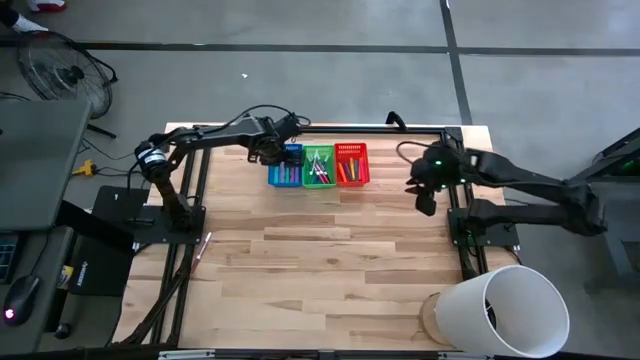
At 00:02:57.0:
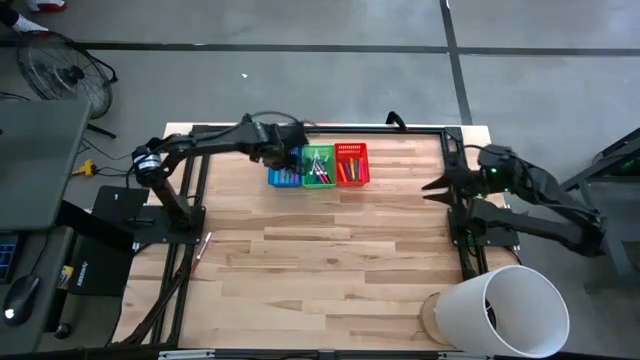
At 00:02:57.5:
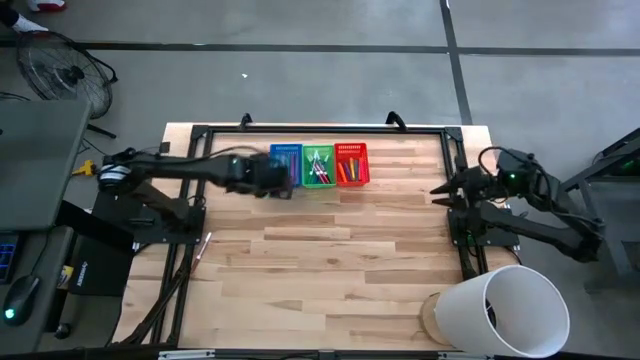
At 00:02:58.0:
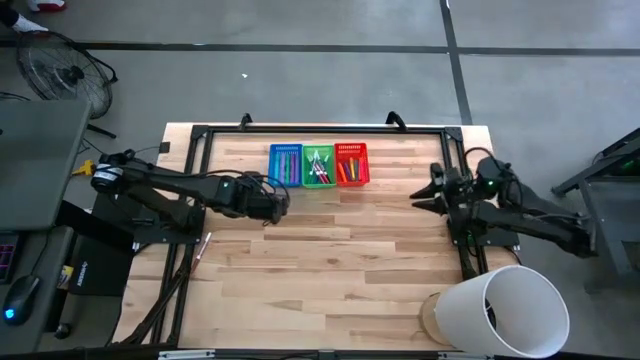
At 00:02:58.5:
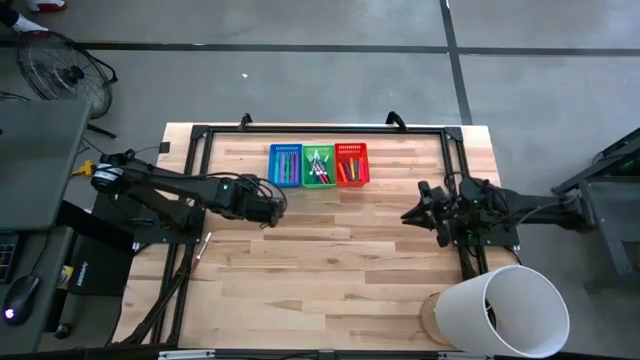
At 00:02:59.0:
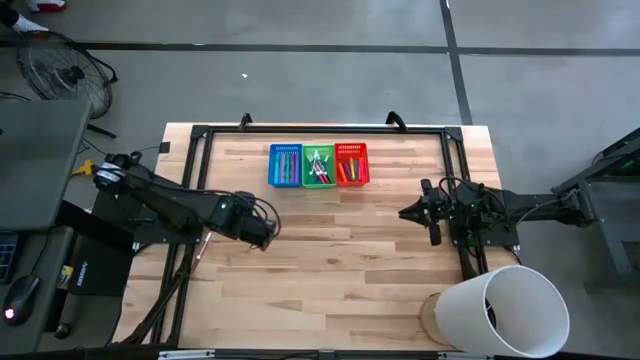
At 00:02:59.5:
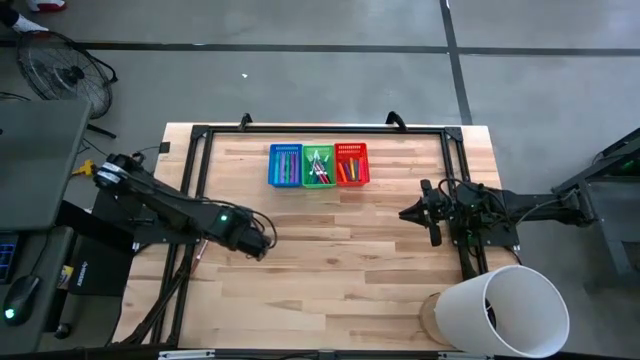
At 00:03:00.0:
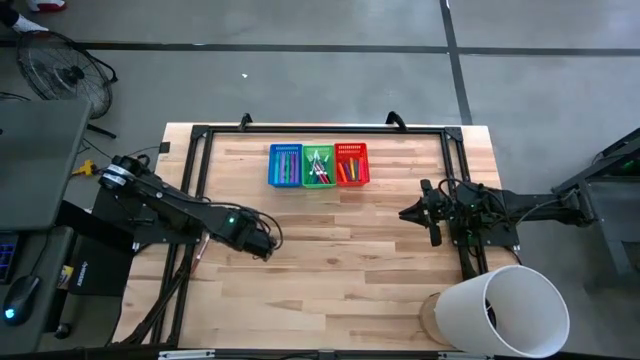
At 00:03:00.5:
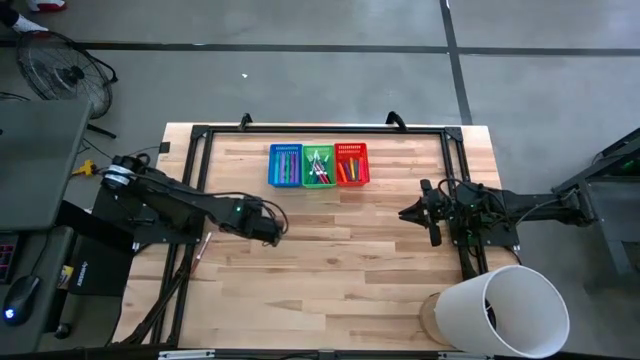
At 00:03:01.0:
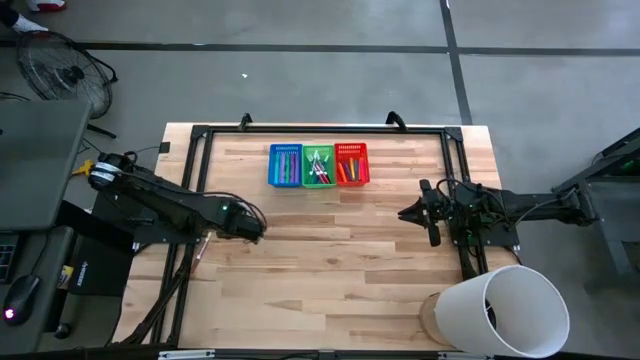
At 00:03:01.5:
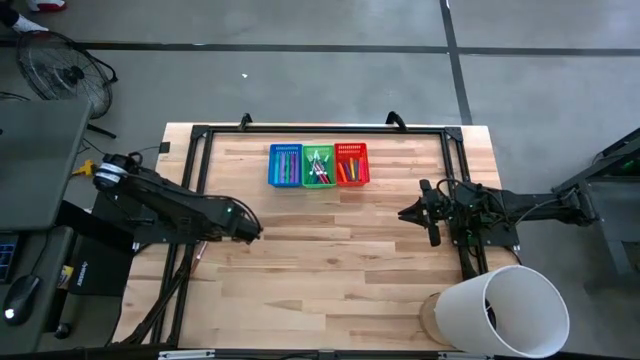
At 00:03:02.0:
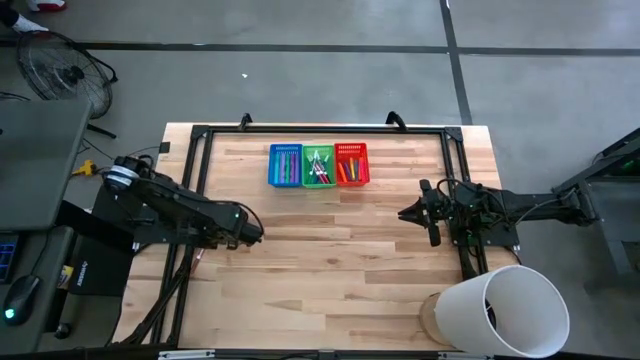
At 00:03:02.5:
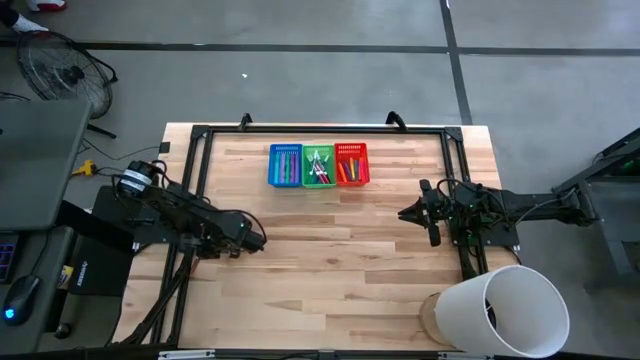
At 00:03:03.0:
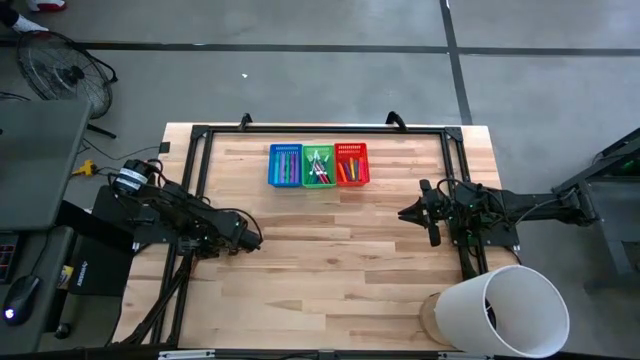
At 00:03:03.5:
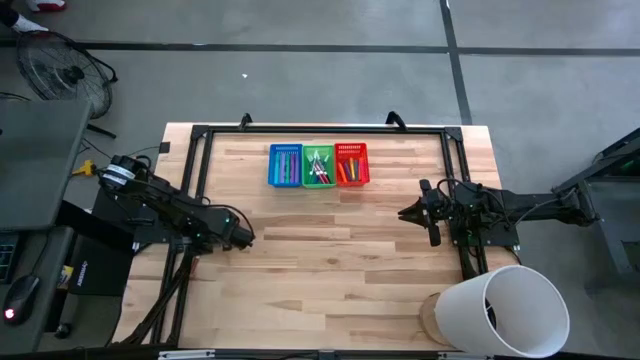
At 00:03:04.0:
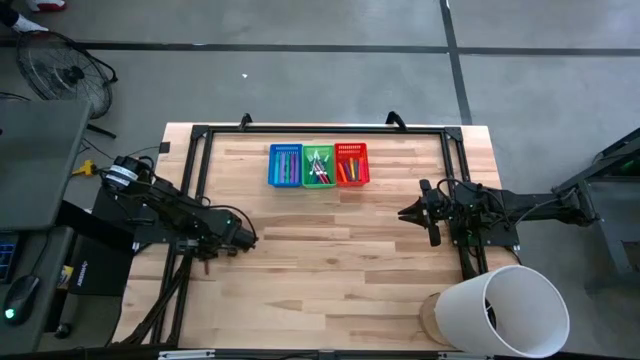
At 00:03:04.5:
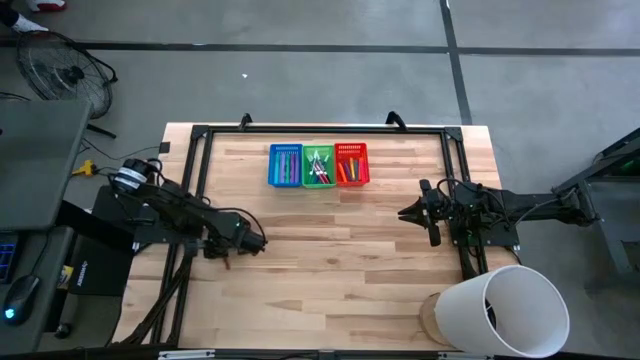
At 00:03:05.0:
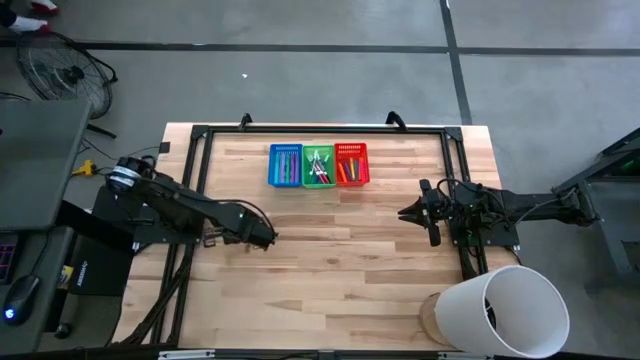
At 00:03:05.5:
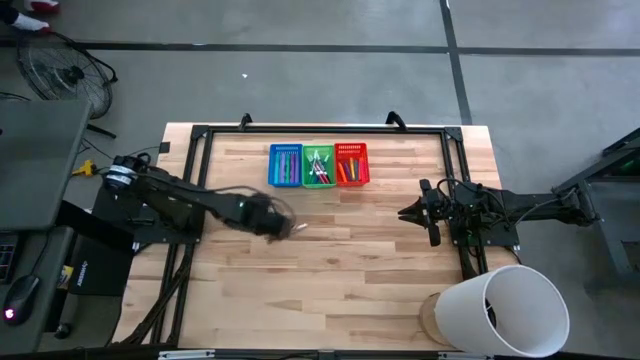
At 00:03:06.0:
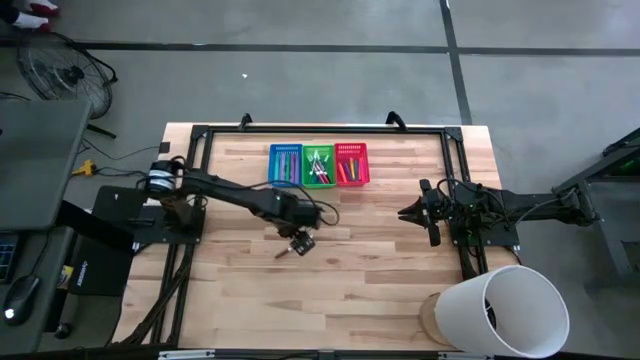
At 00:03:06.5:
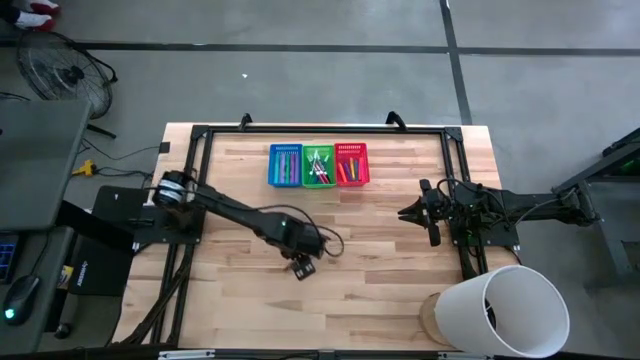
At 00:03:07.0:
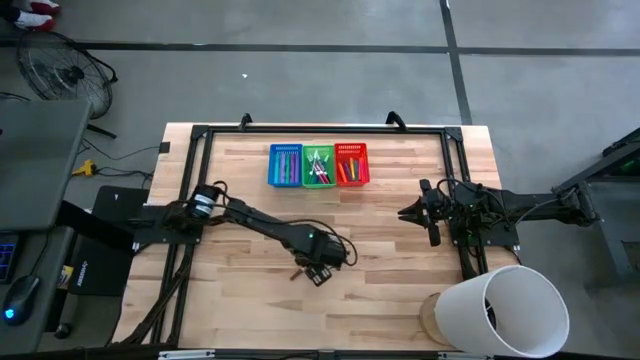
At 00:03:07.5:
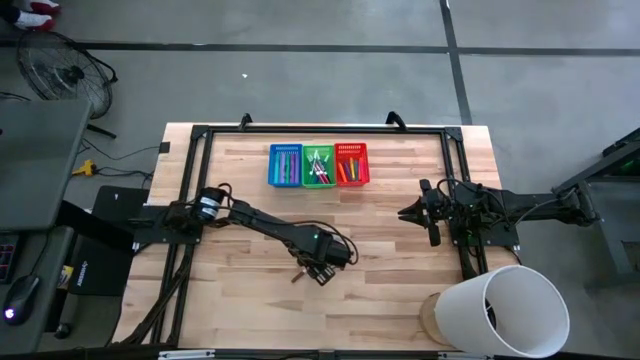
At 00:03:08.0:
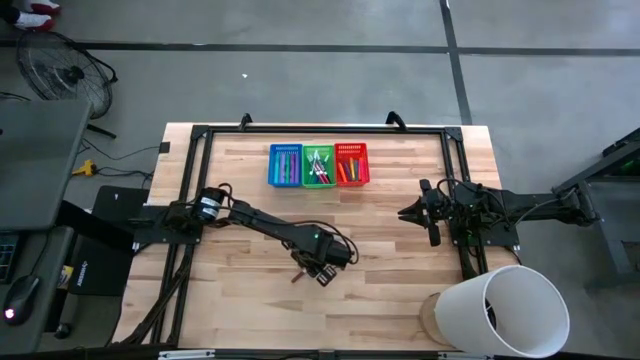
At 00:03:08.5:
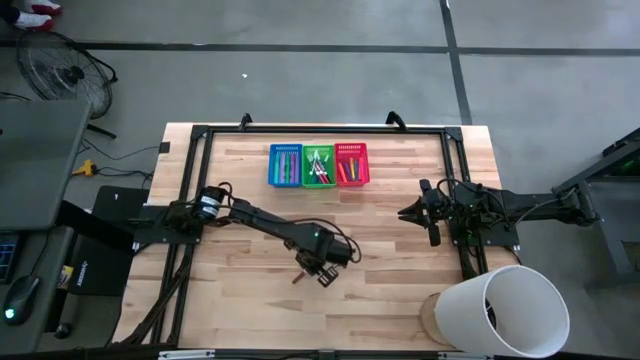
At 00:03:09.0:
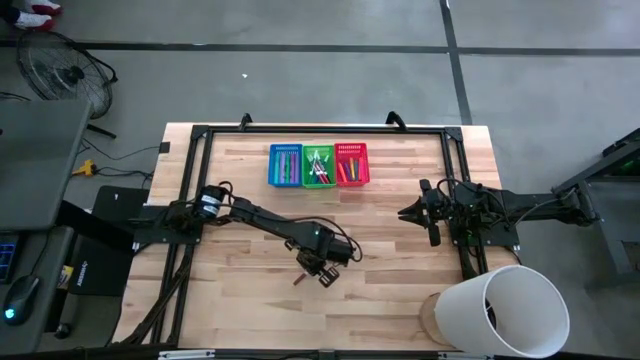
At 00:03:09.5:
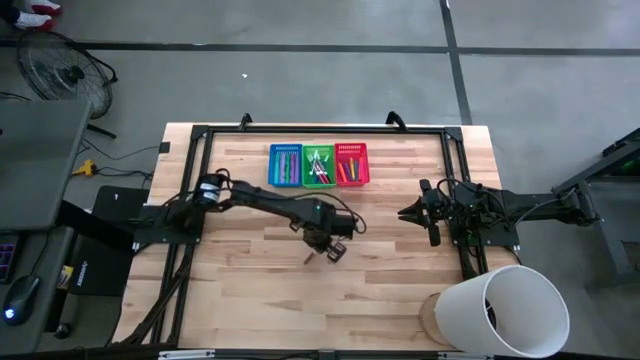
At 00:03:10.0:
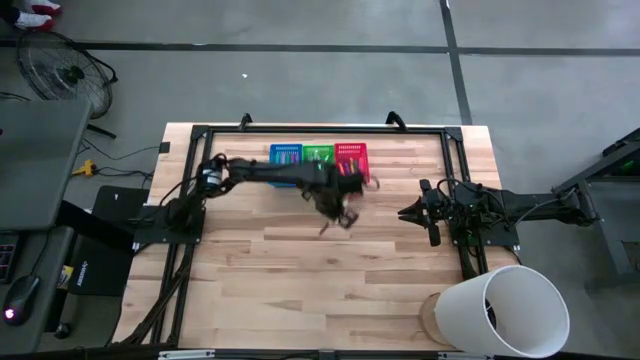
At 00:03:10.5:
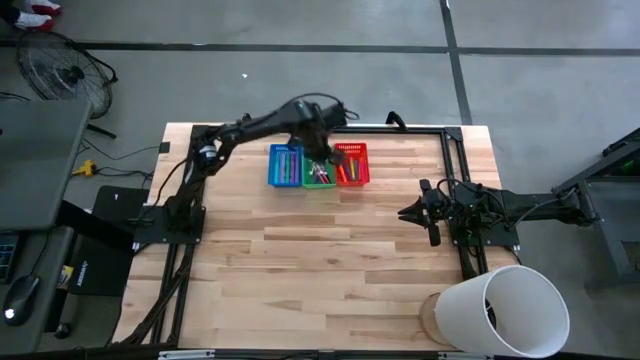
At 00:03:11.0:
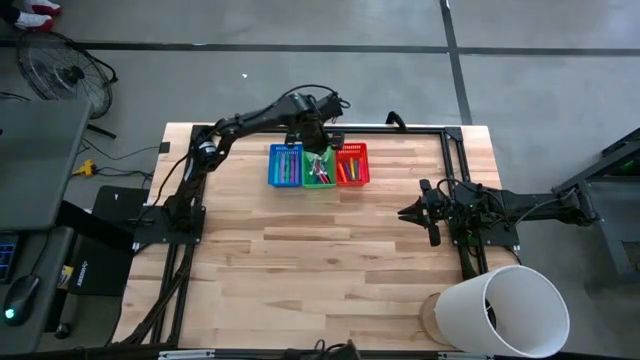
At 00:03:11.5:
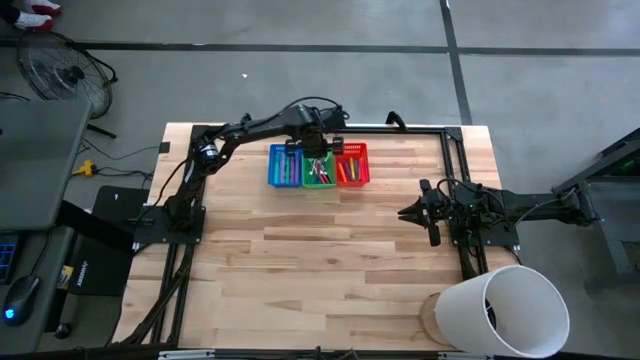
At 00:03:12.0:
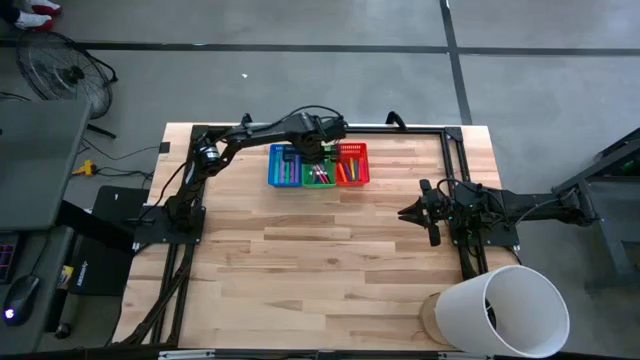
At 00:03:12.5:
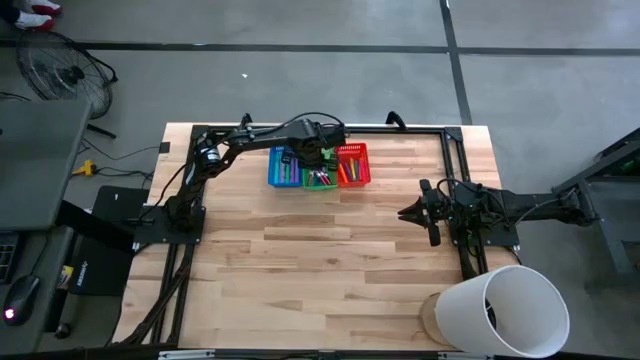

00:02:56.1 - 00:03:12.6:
Task: Pick & Place Markers
Put the brown marker pen into the green bin

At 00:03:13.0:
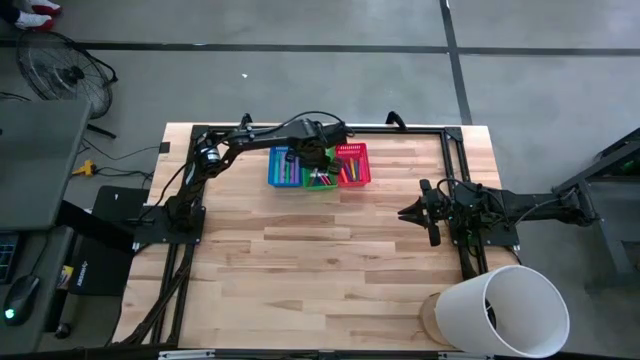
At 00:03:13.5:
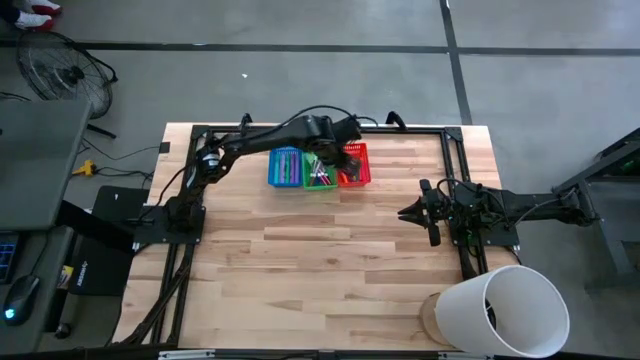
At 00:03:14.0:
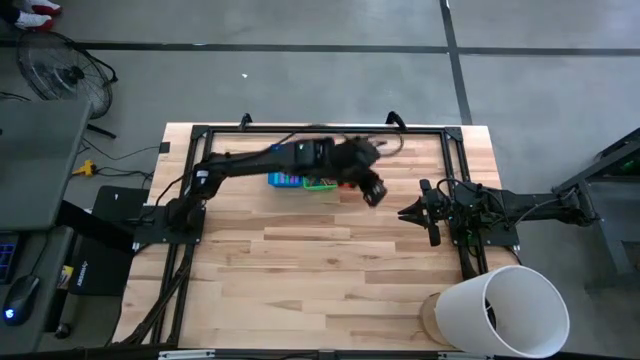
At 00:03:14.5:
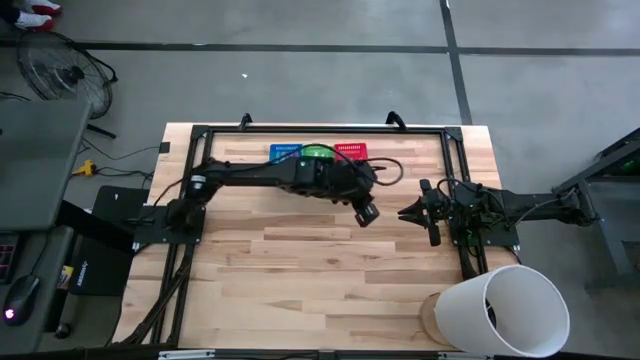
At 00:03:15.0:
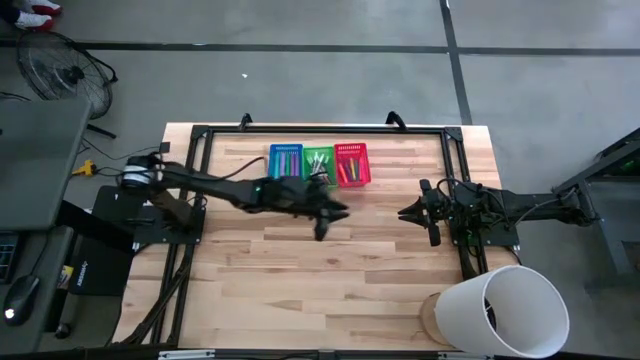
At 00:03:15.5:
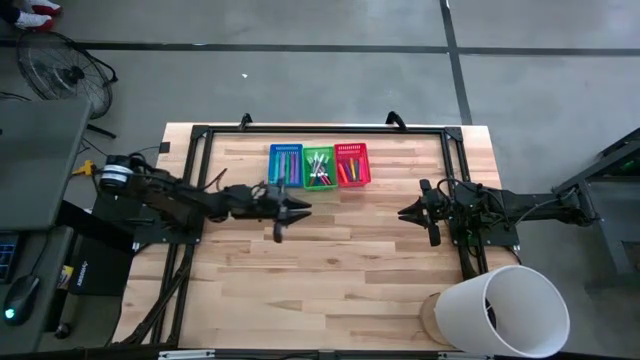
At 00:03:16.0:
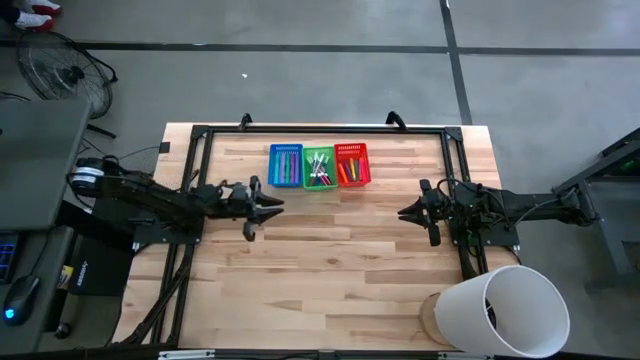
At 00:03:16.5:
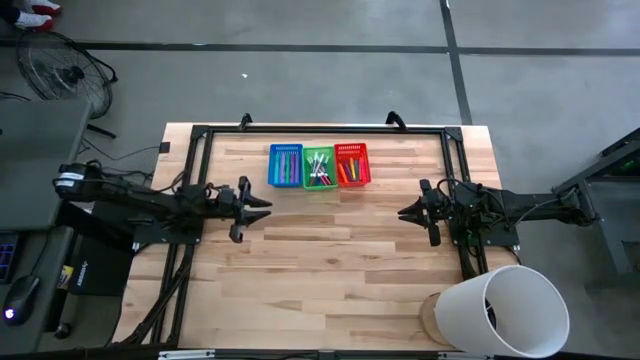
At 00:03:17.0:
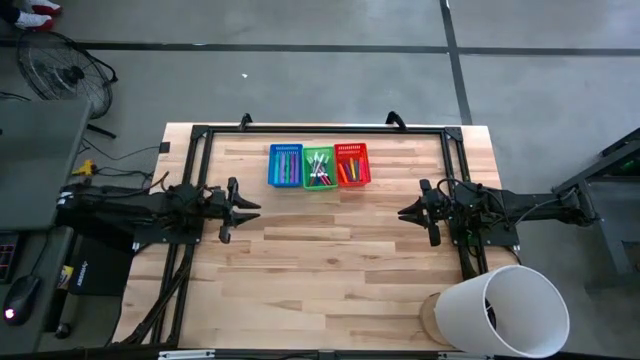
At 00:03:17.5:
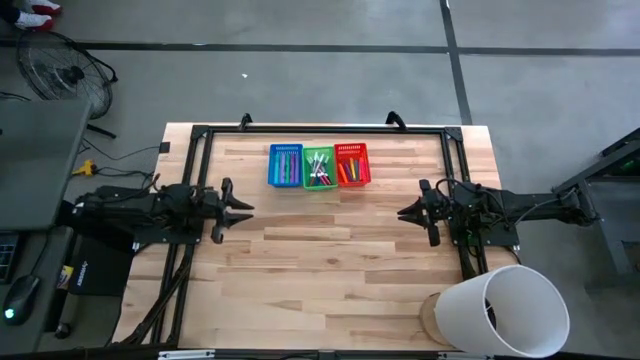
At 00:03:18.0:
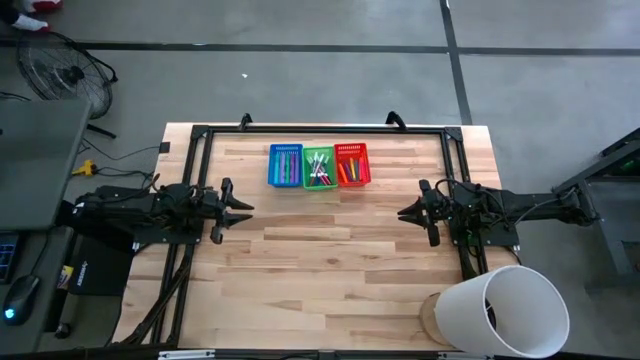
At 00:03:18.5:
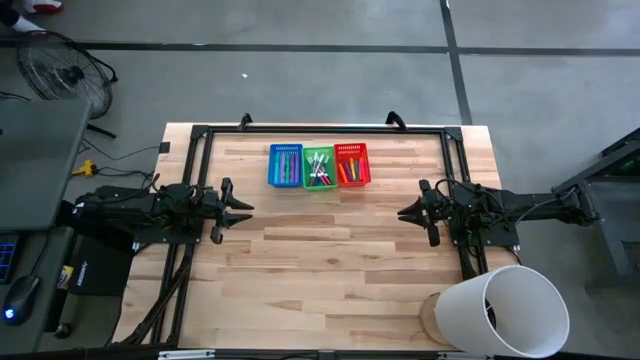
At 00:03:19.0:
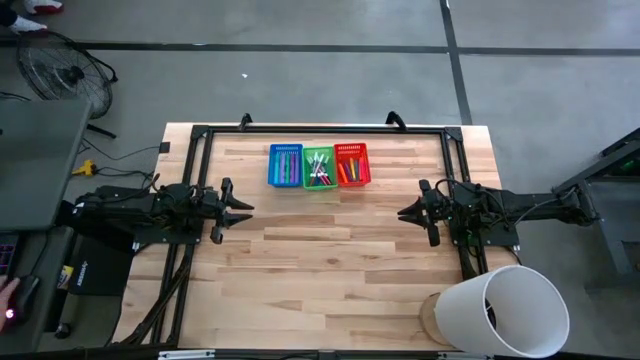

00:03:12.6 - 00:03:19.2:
Return to Home Position
